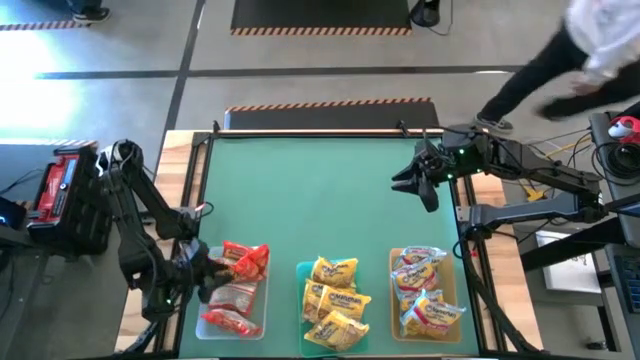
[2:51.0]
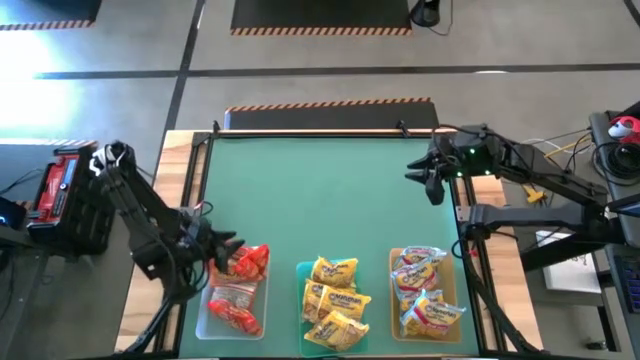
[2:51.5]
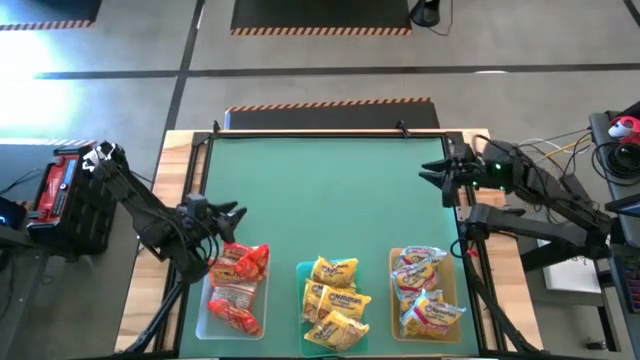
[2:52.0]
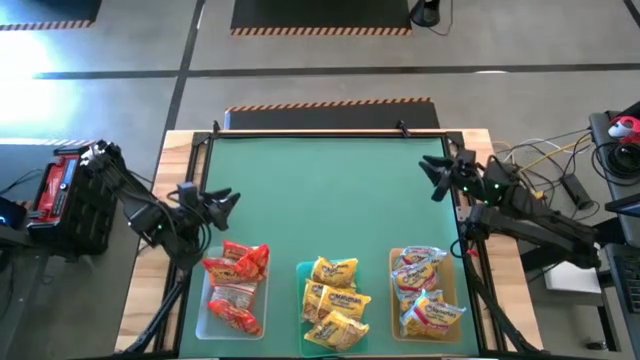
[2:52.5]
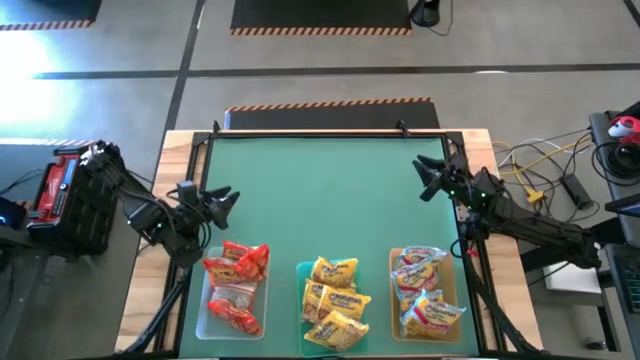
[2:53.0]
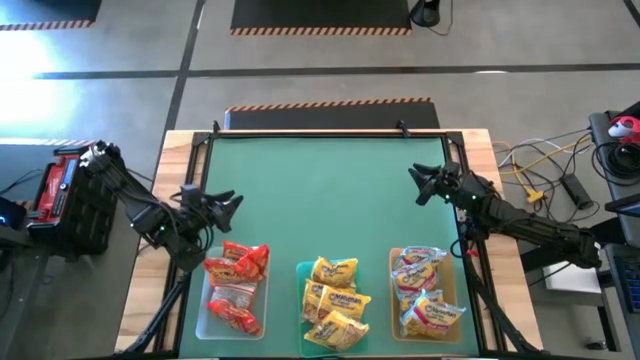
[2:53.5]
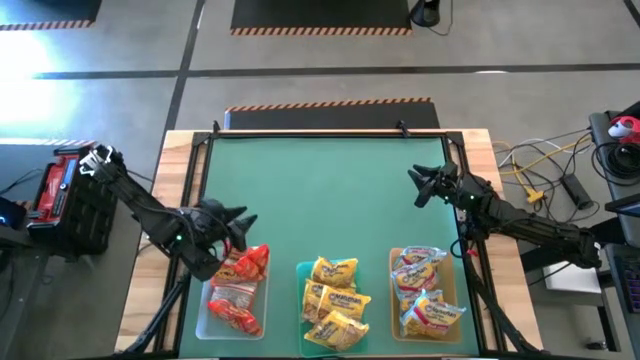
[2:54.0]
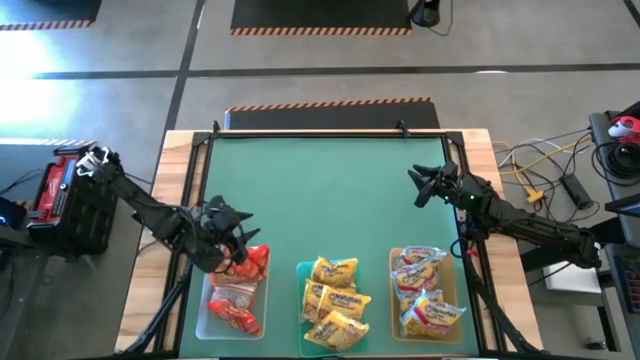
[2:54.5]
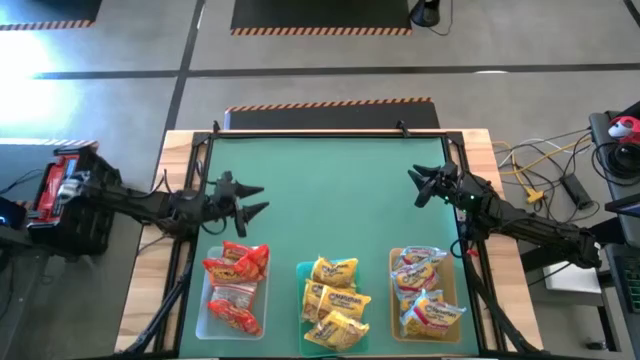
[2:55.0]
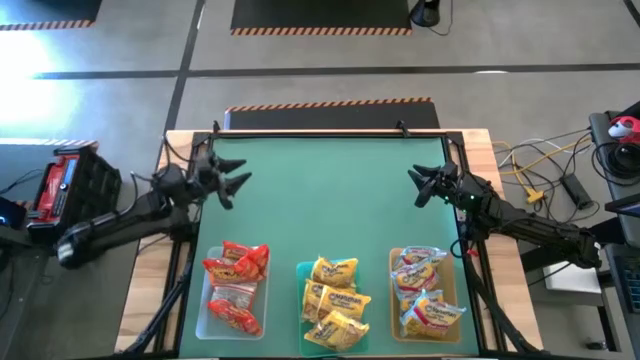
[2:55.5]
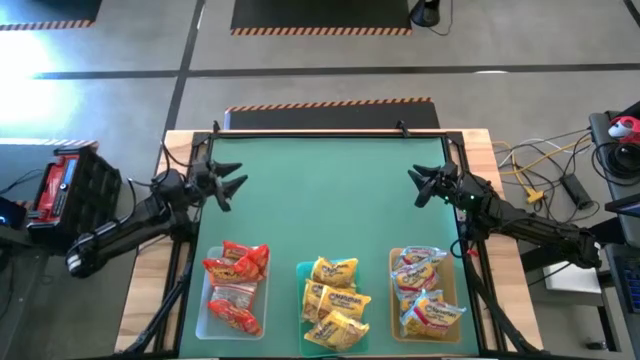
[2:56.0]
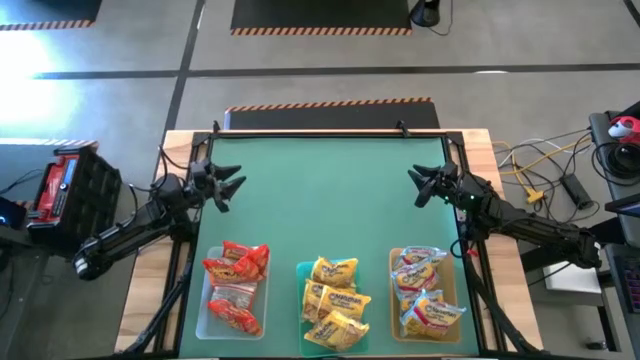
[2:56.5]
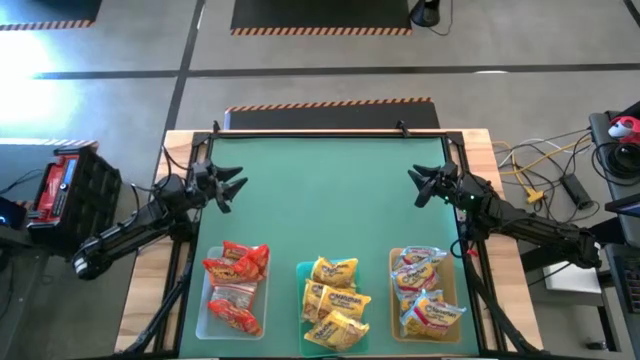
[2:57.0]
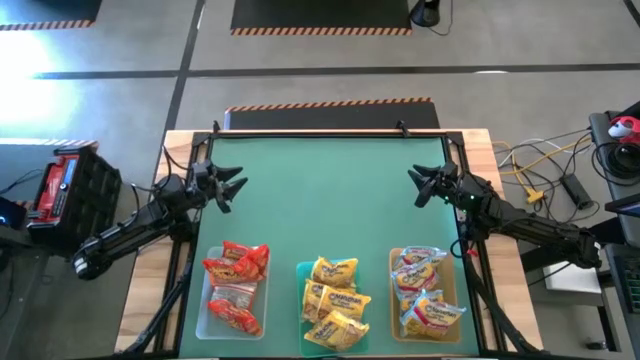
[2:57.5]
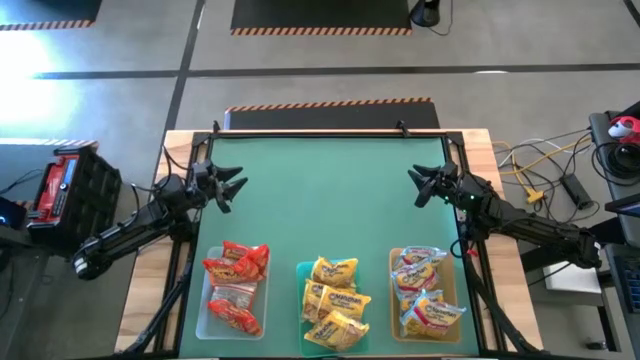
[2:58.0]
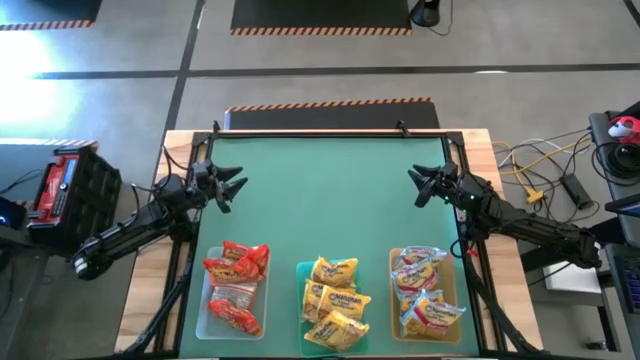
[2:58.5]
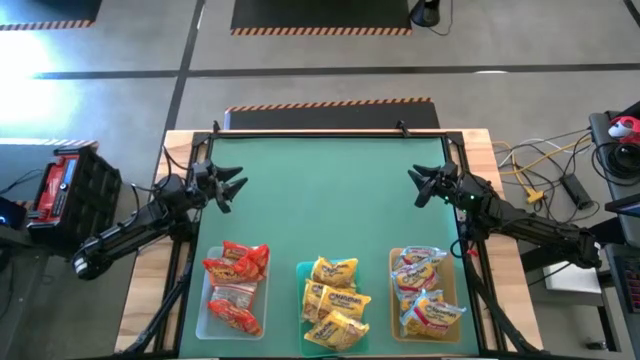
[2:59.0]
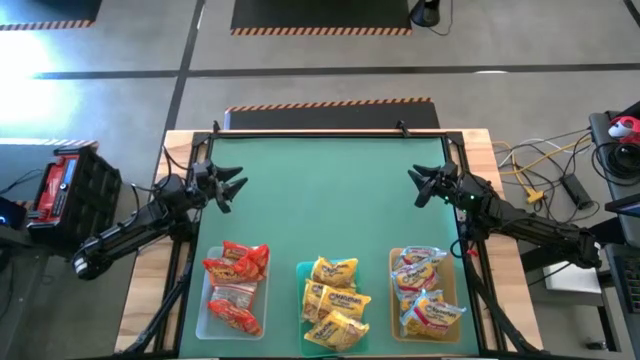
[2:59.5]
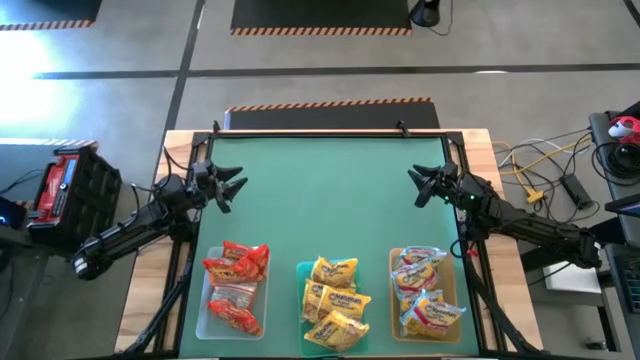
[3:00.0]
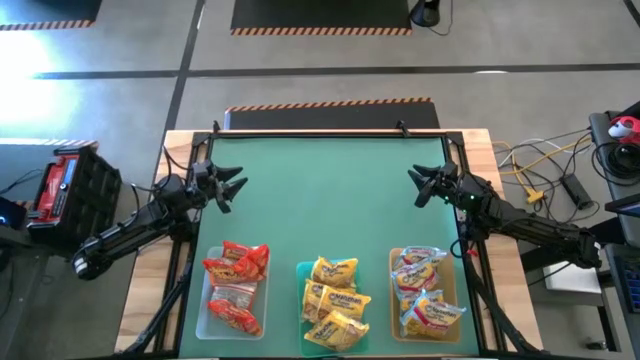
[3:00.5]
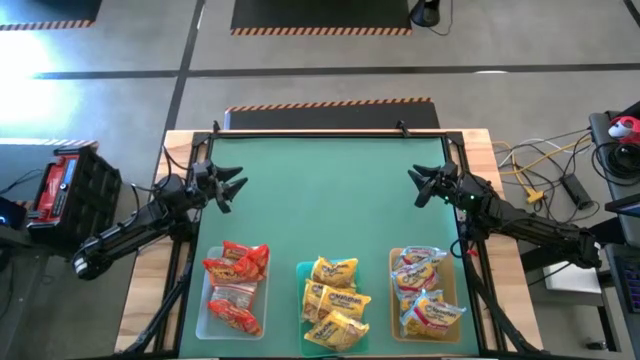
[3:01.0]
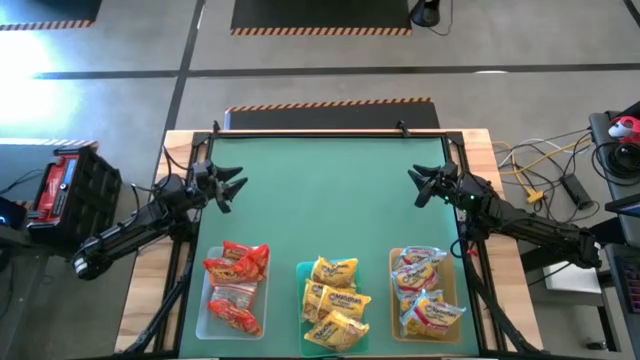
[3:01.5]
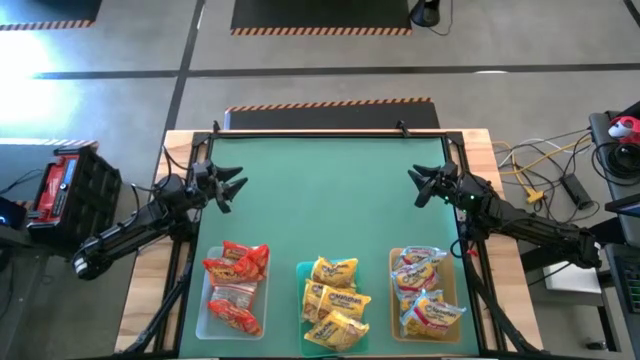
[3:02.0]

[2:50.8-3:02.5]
Task: Sort Maruchan noodles
Return to Home Position

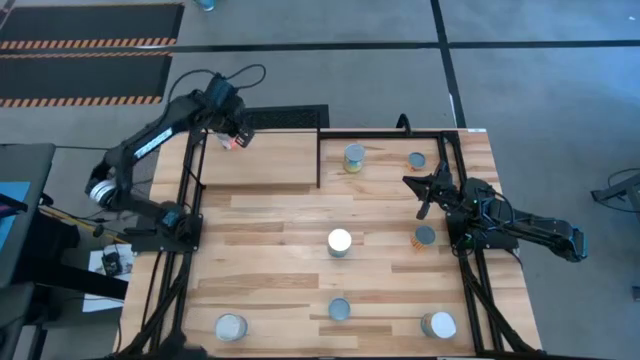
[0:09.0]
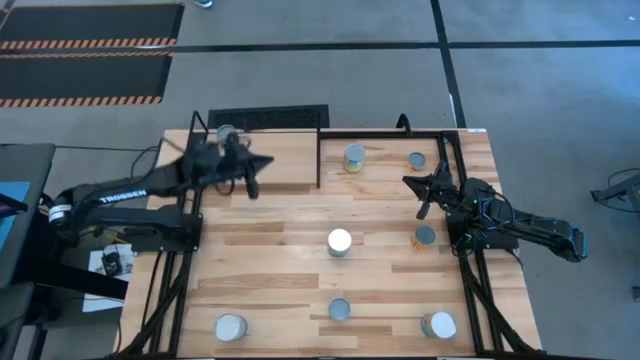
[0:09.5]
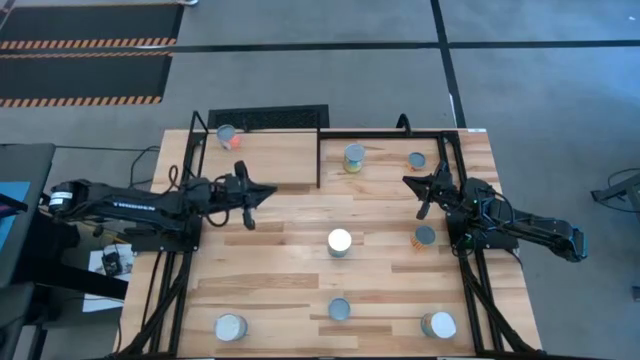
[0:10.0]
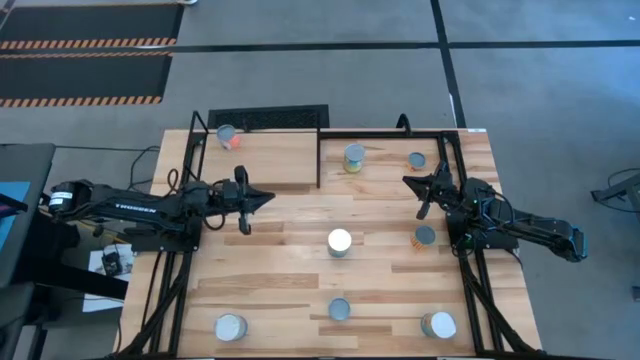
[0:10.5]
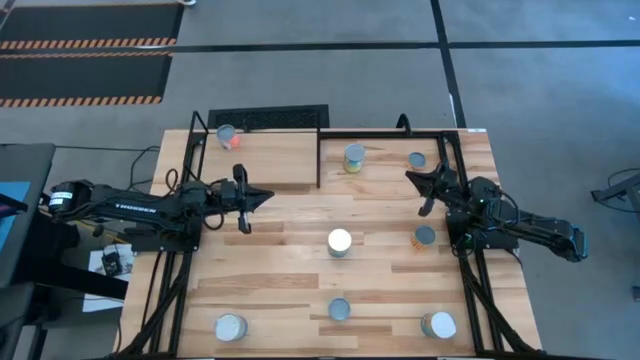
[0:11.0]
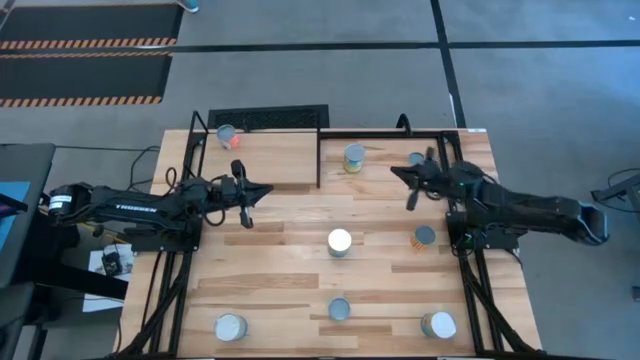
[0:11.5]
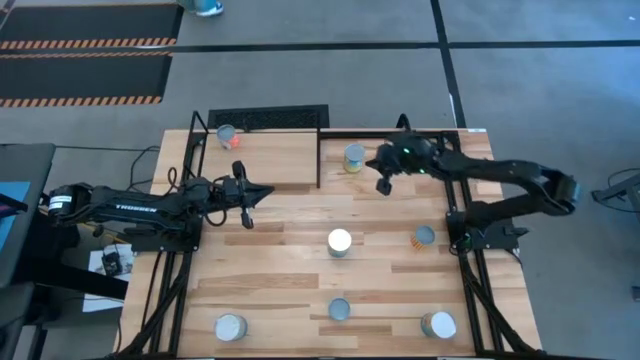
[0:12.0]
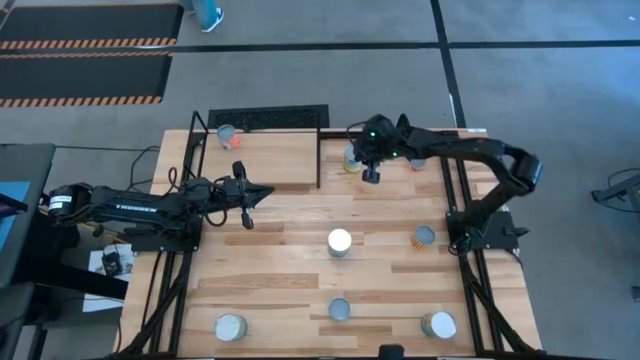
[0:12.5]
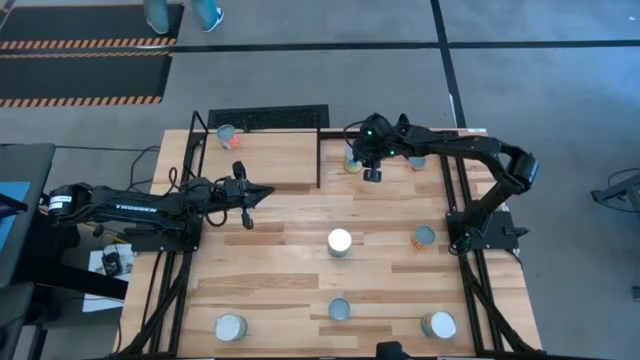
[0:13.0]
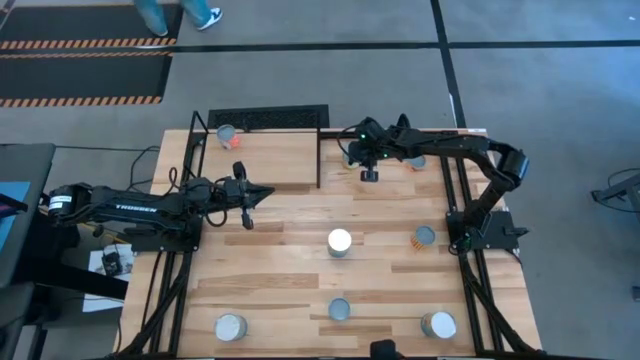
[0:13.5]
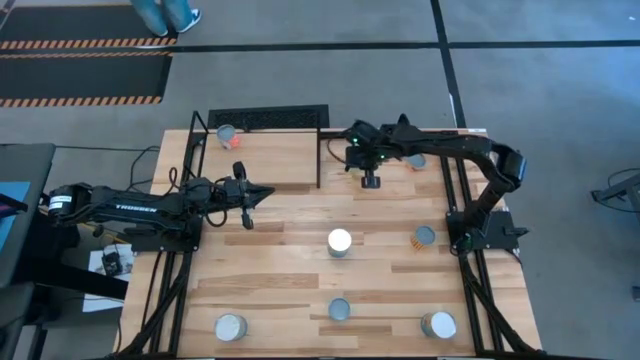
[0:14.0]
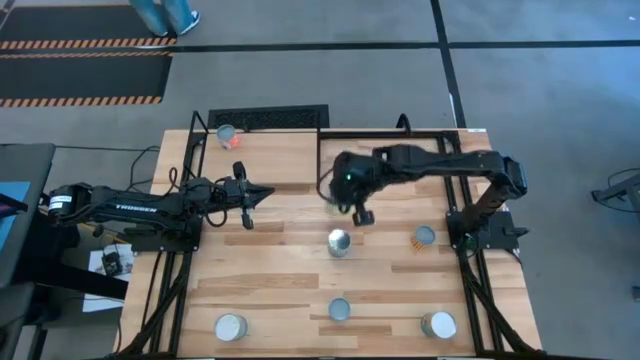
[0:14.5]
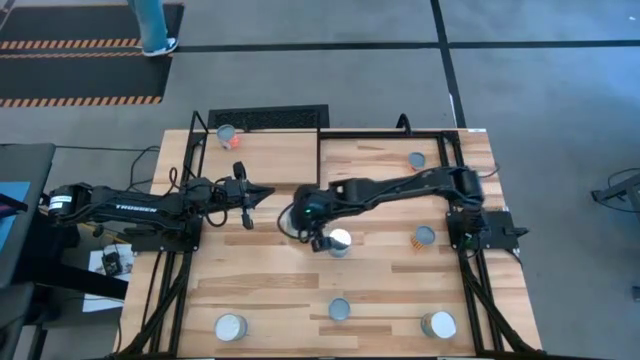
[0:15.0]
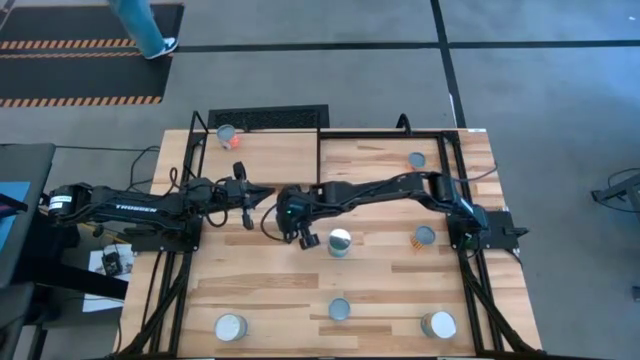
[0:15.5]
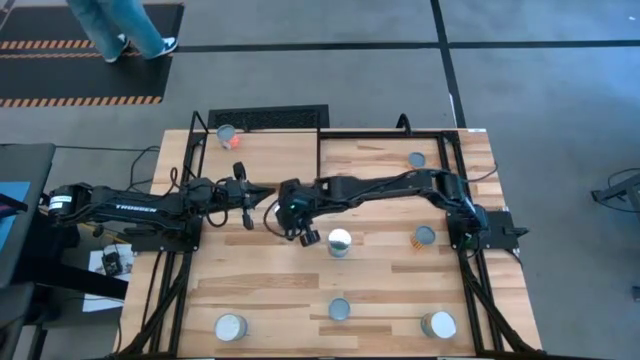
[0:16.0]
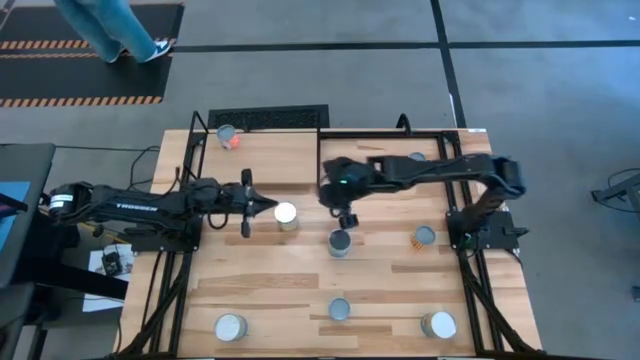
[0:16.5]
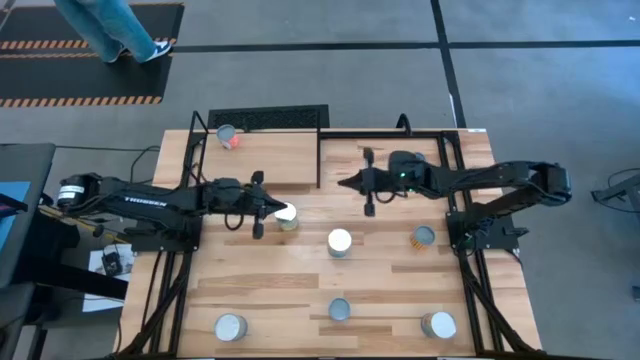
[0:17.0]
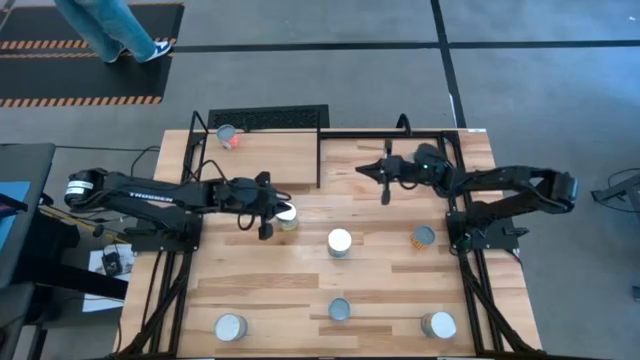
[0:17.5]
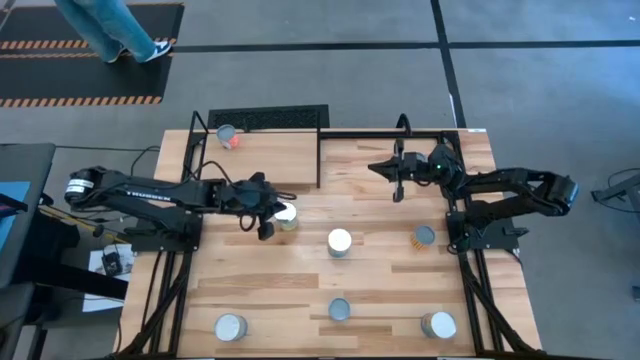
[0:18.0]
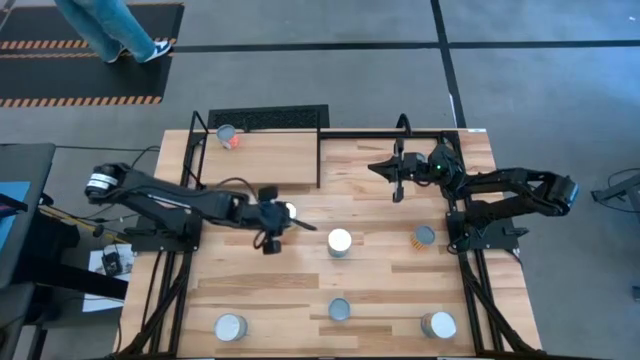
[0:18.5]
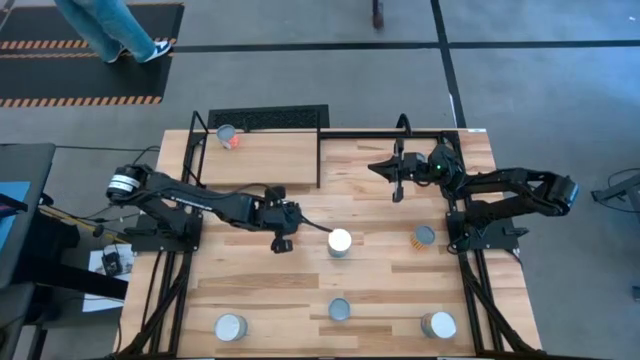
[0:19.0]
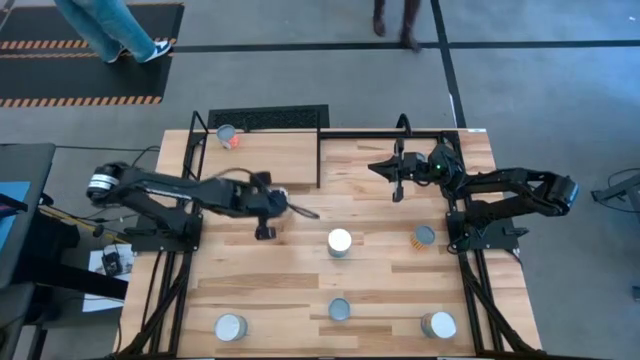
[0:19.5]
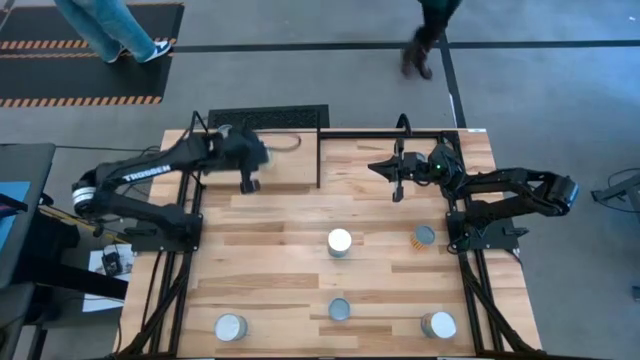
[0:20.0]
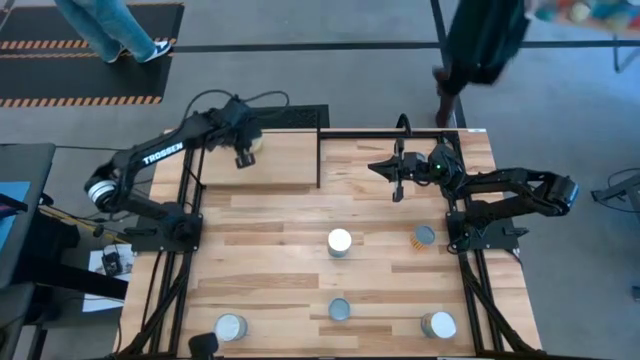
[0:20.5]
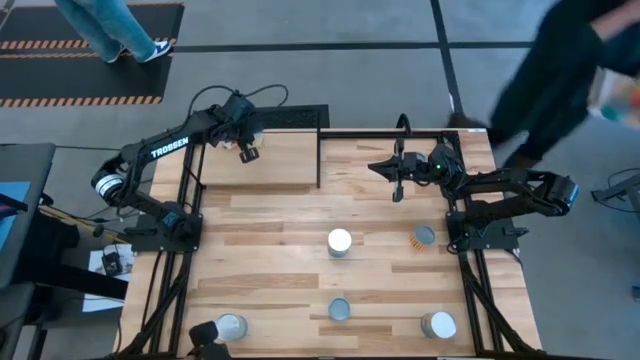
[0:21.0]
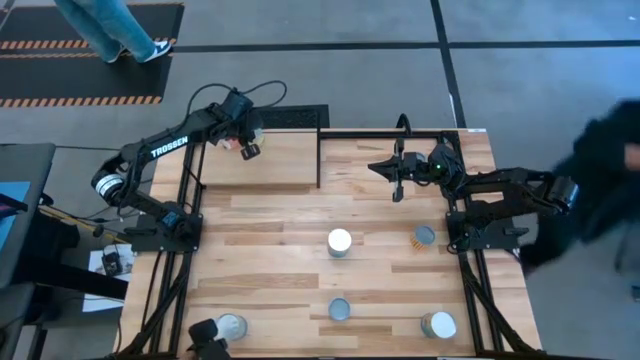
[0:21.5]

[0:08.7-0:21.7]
Task: Pick and place cans onto a shelf
Put the large canned carrots on the shelf
